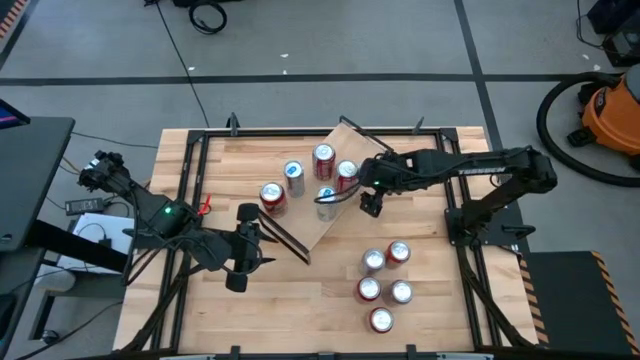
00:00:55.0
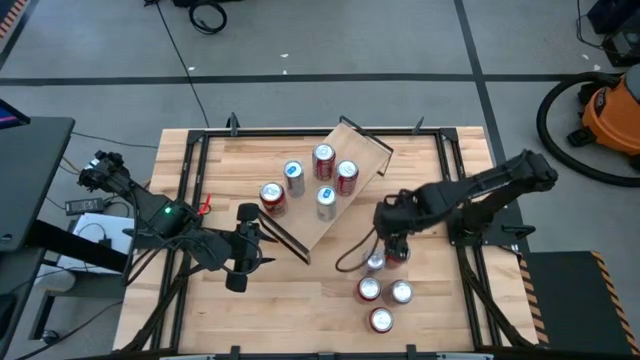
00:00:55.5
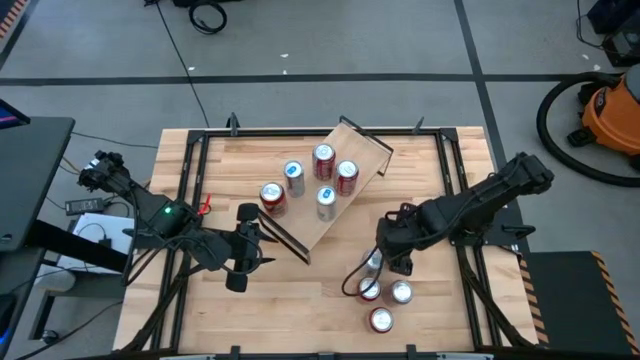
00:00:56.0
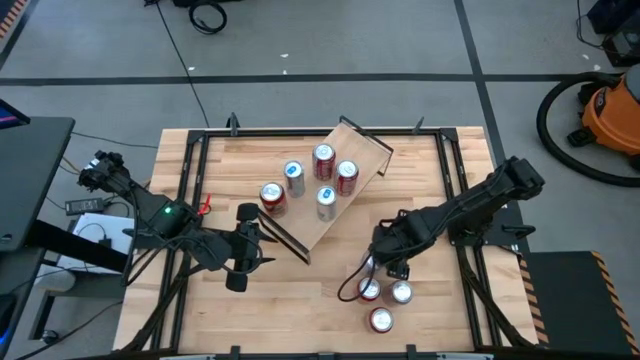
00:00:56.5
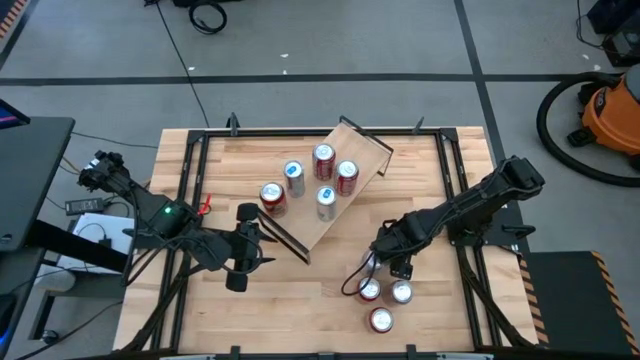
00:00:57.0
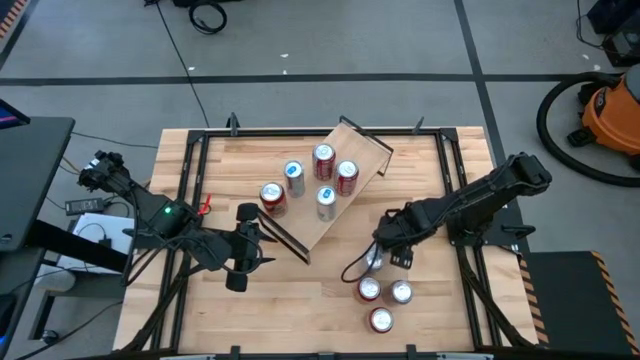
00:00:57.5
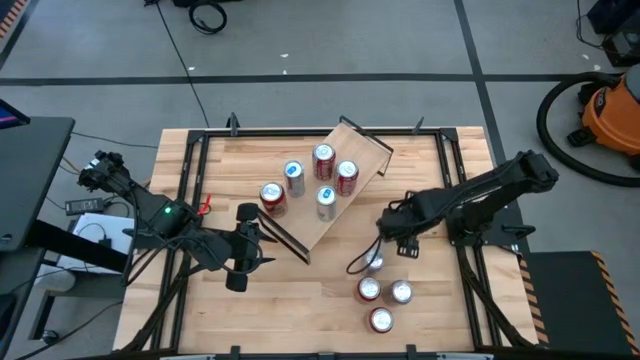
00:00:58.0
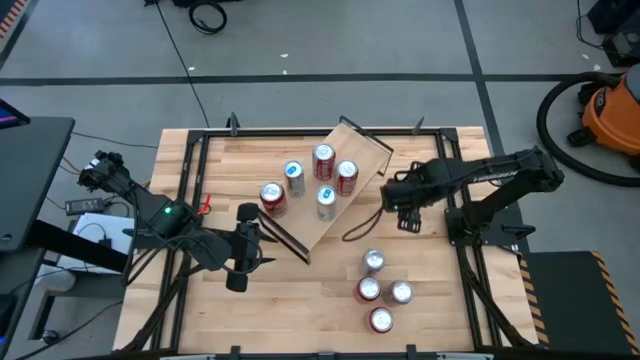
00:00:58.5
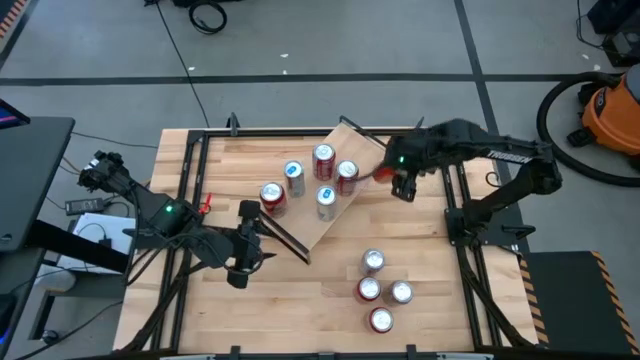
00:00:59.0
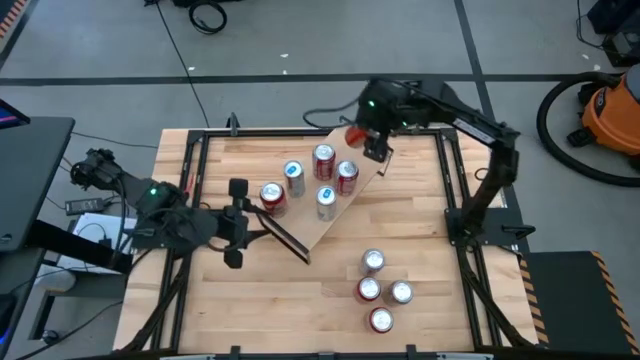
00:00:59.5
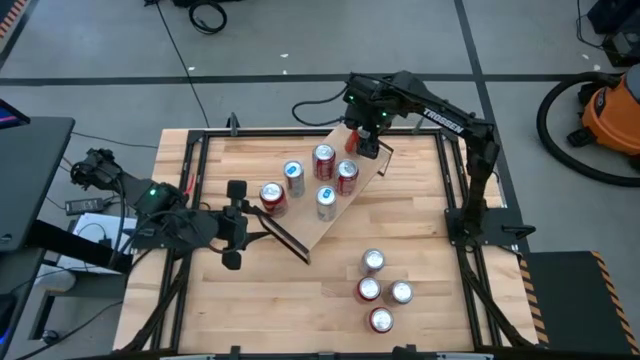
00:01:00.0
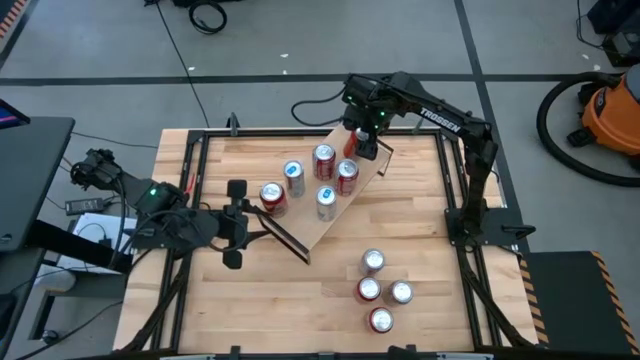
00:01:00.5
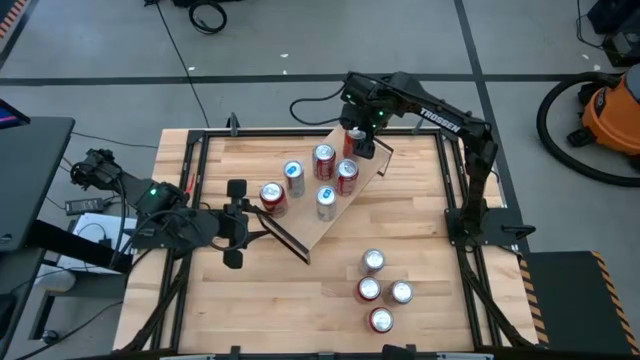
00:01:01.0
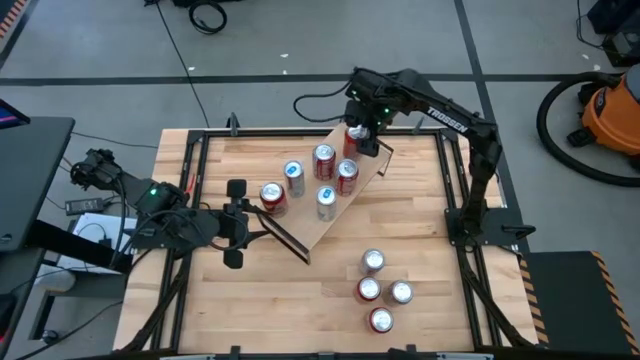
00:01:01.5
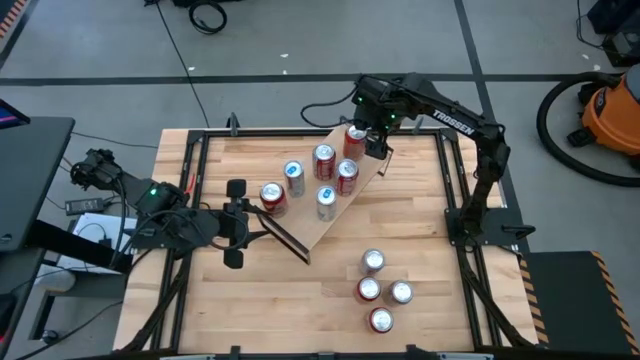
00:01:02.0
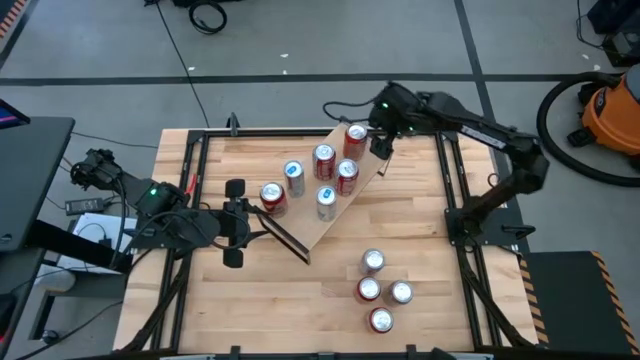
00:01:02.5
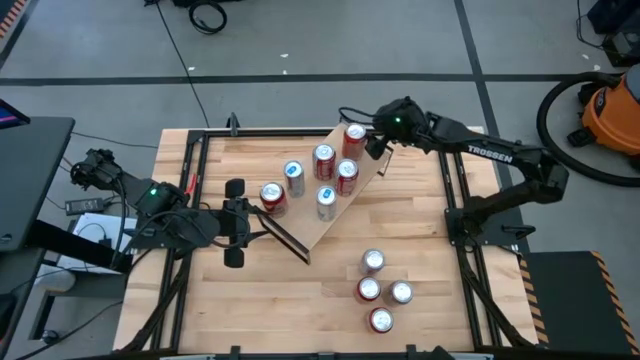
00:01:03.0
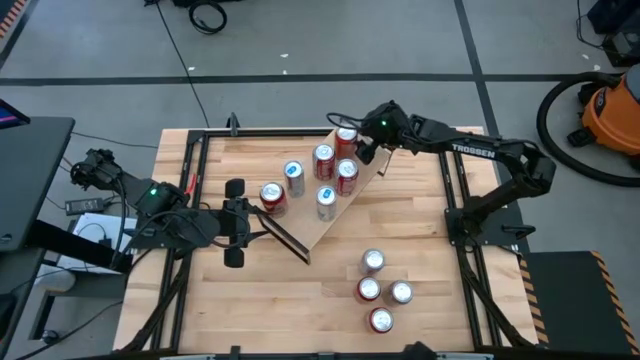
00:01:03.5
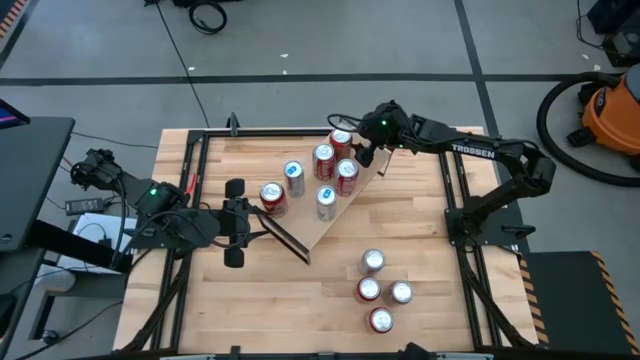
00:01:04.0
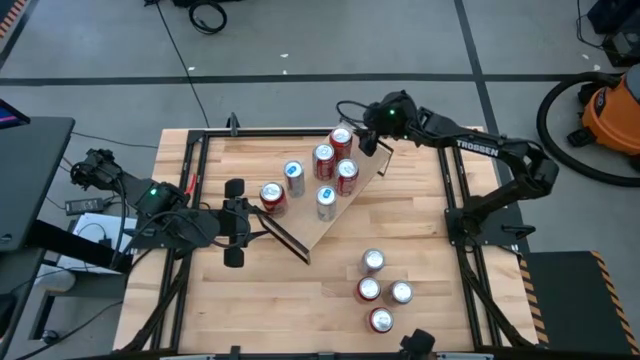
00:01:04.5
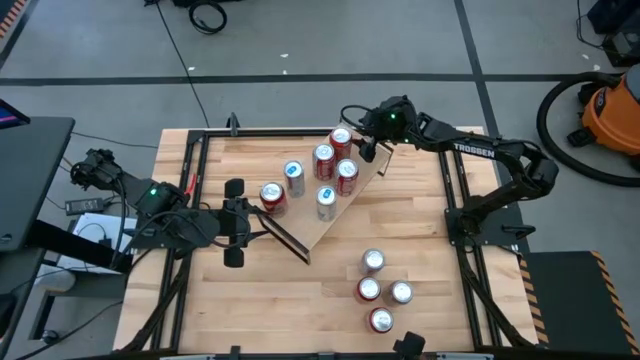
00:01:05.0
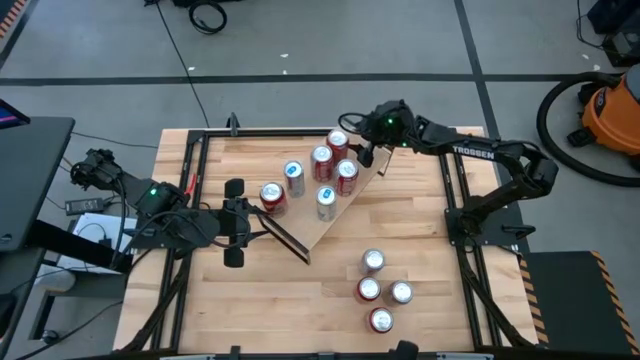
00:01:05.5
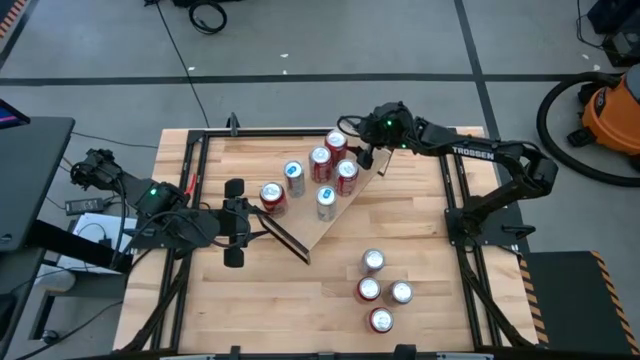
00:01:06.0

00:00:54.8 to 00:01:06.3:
Task: Place canned beverage on shelf
Put the top red soda can on the shelf

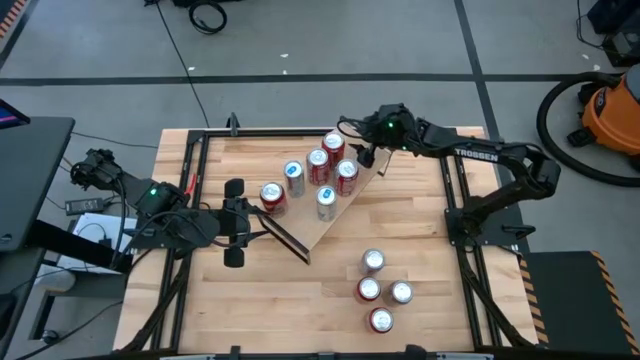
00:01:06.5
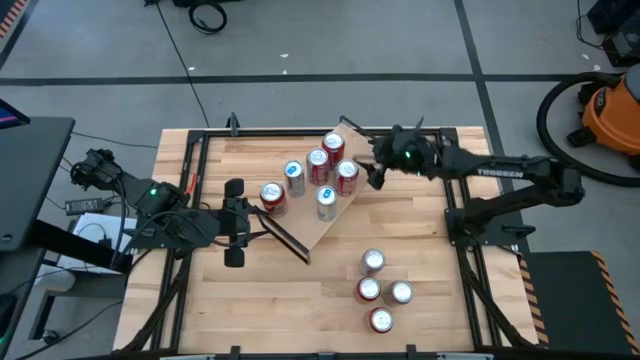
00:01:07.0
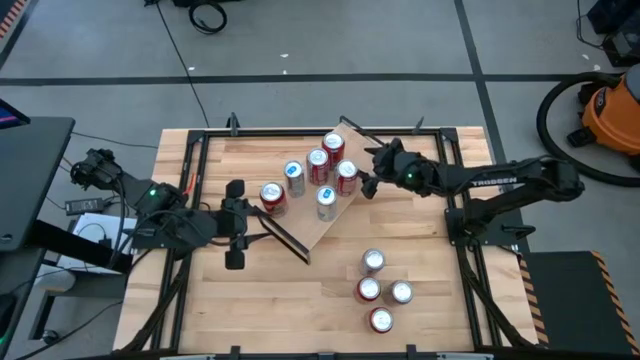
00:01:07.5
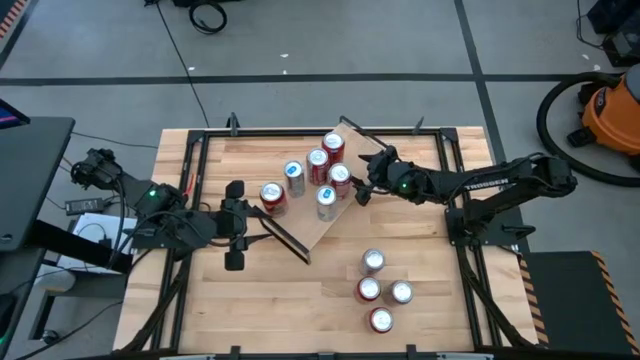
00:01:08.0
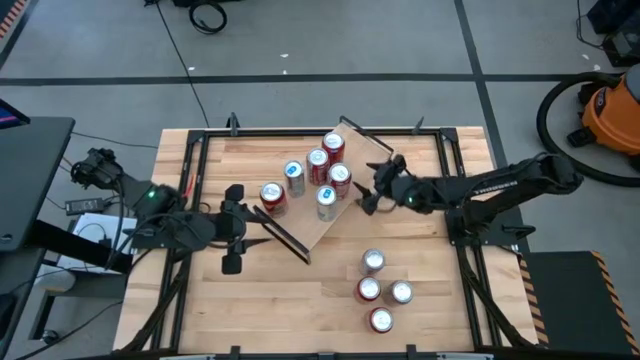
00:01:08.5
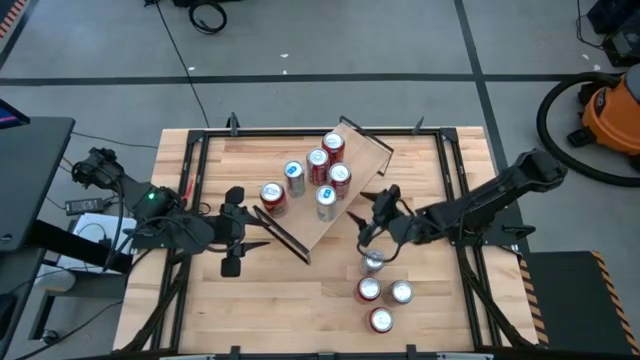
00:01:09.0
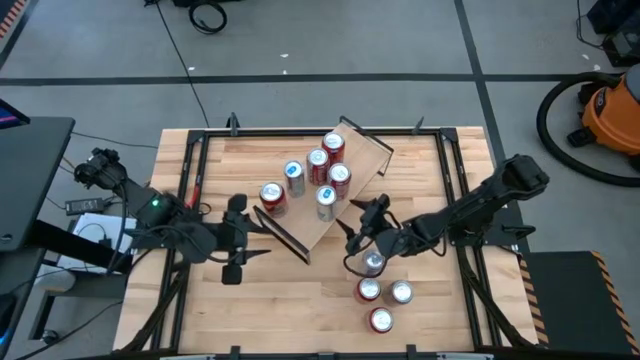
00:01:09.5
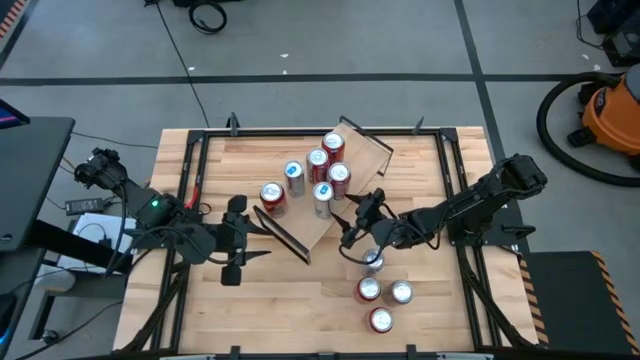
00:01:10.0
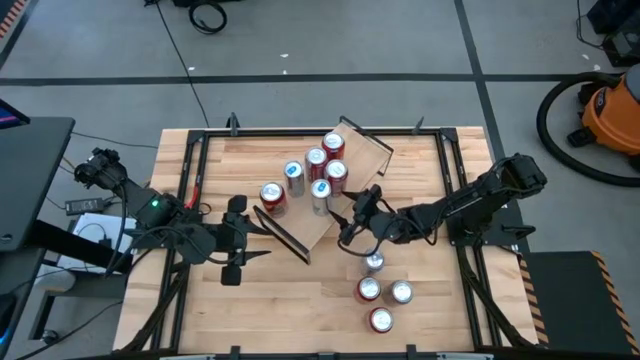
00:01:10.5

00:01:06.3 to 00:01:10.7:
Adjust the soda cans on the shelf

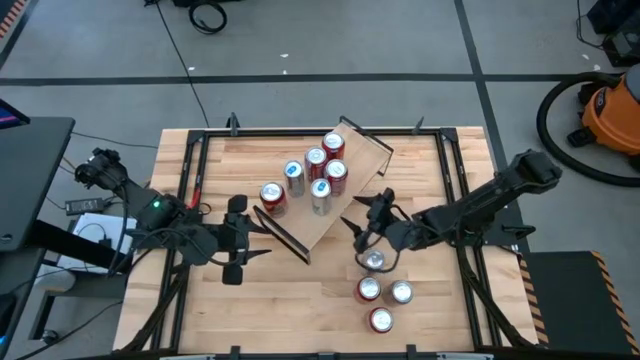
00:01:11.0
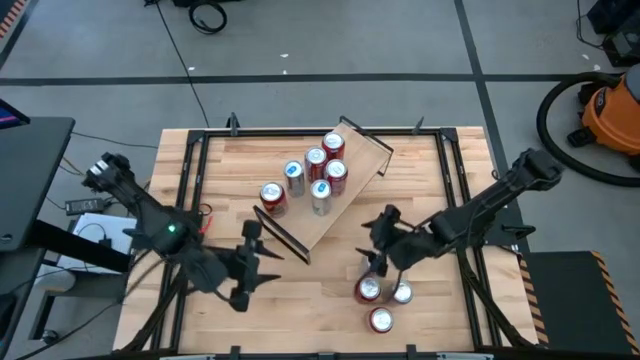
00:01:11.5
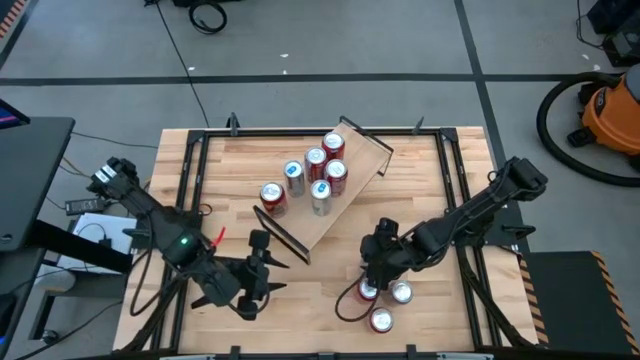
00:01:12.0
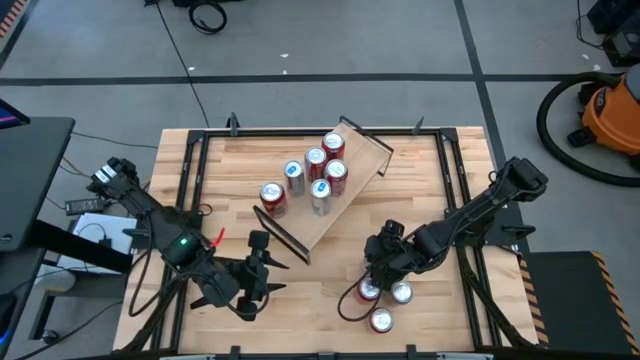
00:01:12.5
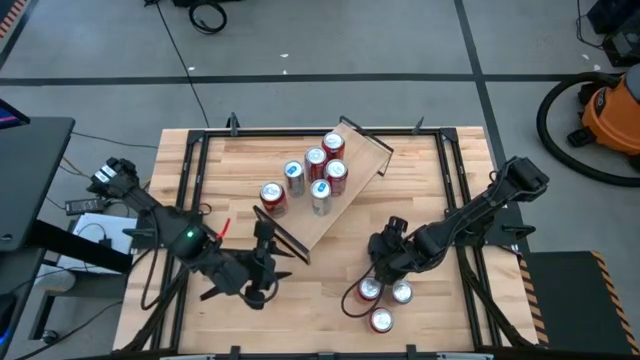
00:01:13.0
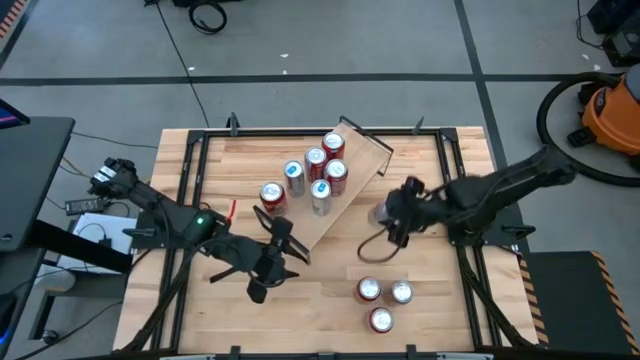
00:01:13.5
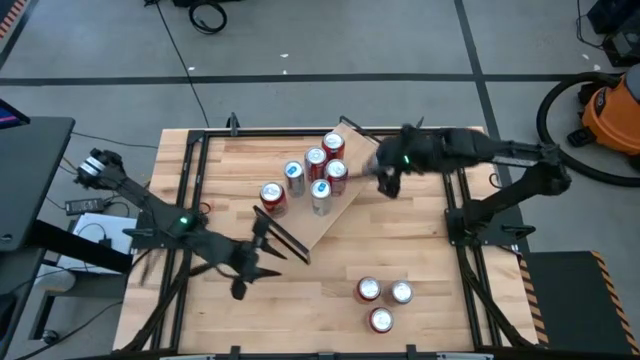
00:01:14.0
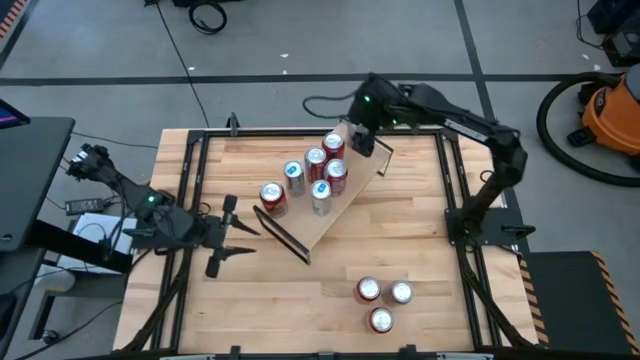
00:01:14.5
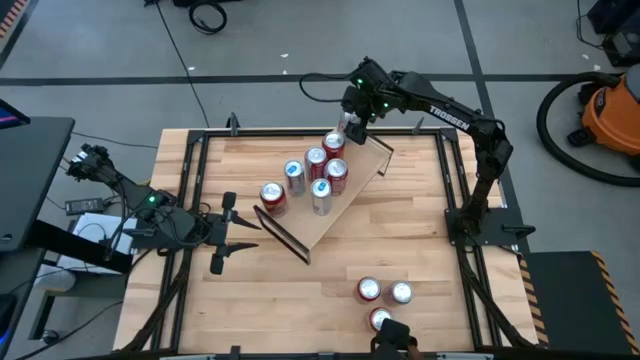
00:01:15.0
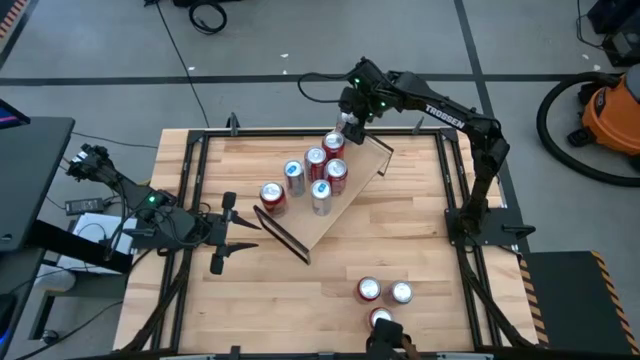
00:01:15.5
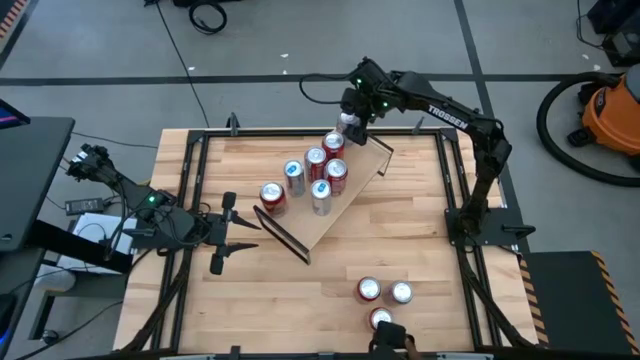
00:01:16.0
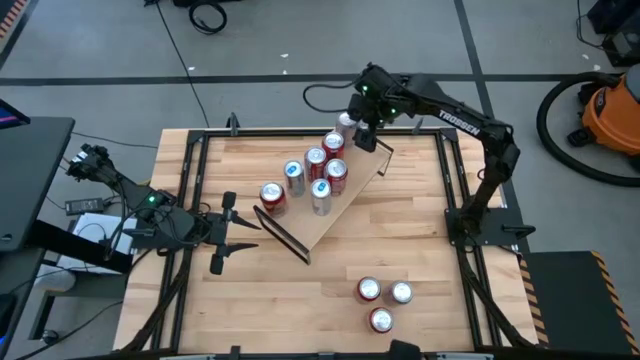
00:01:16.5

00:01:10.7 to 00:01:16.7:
Put the red-silver soda can on the shelf
